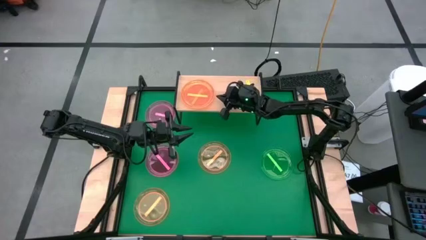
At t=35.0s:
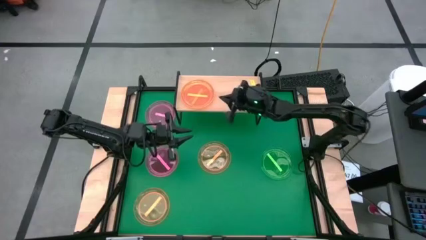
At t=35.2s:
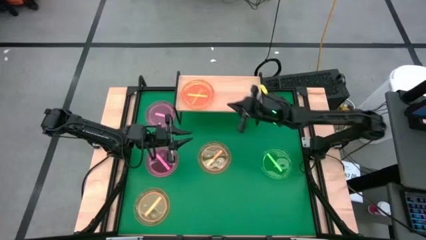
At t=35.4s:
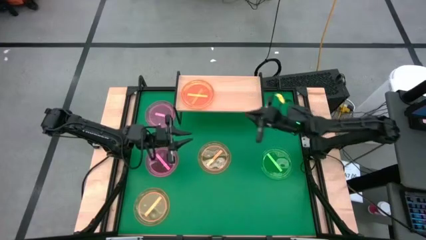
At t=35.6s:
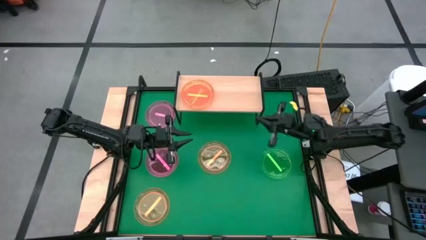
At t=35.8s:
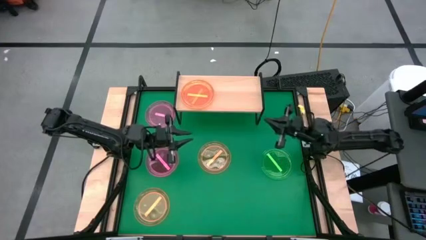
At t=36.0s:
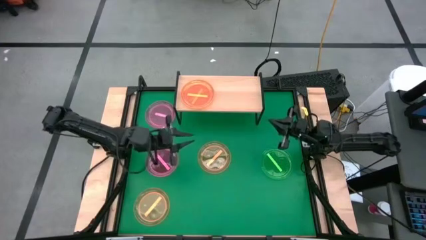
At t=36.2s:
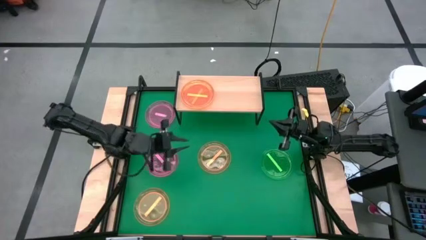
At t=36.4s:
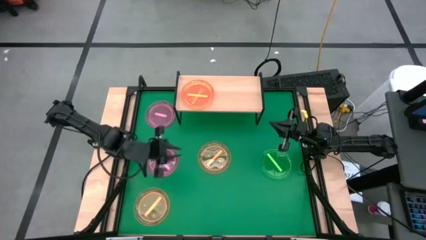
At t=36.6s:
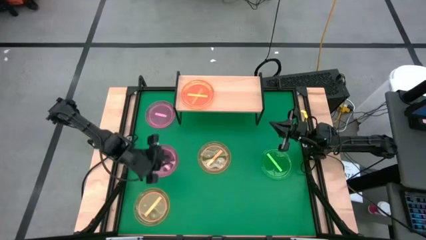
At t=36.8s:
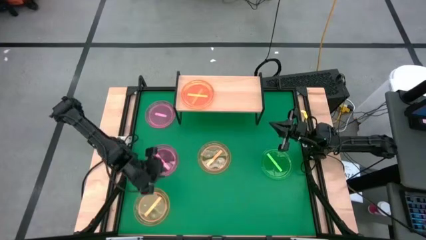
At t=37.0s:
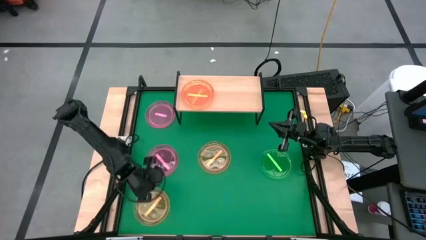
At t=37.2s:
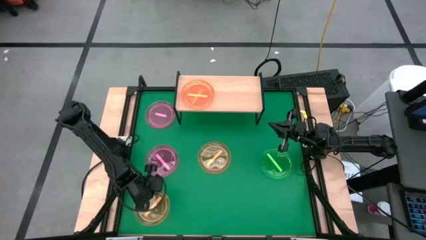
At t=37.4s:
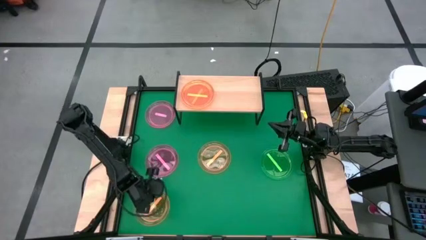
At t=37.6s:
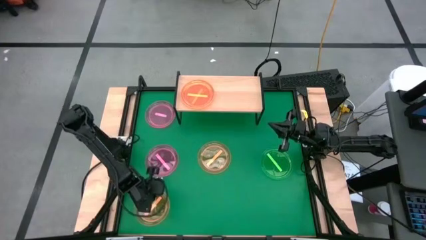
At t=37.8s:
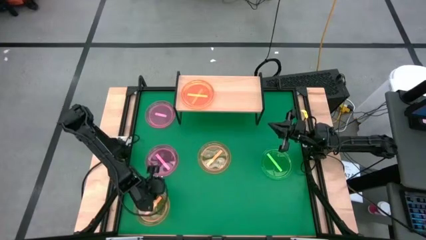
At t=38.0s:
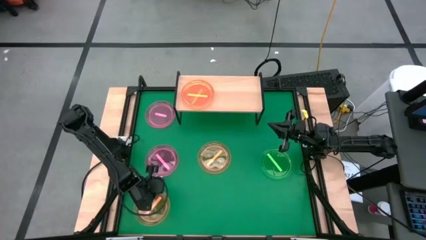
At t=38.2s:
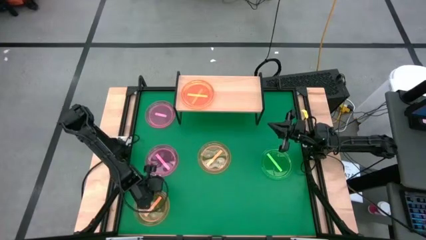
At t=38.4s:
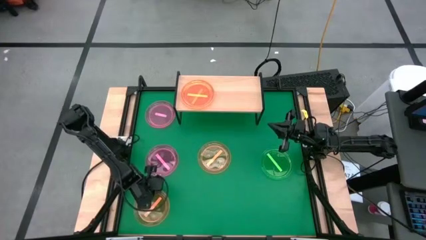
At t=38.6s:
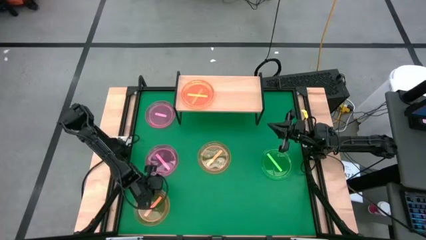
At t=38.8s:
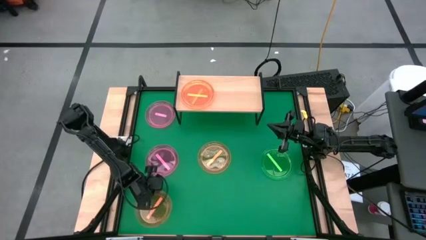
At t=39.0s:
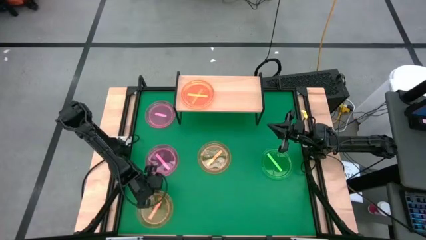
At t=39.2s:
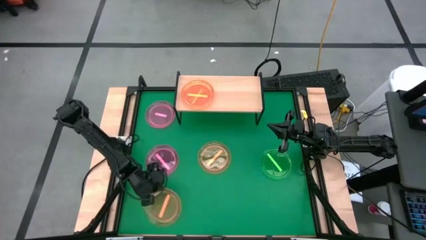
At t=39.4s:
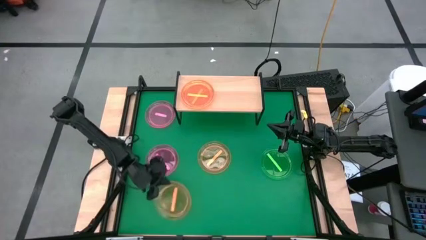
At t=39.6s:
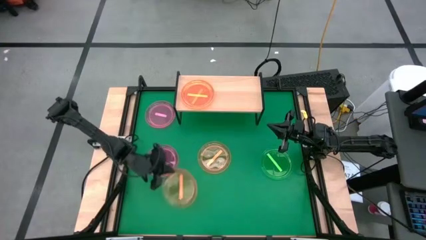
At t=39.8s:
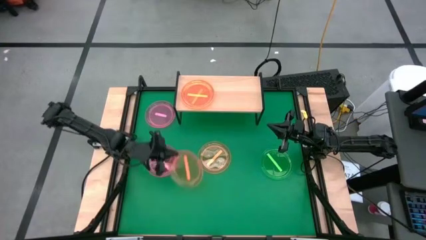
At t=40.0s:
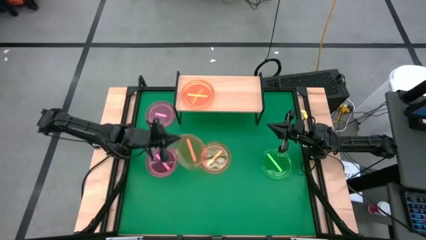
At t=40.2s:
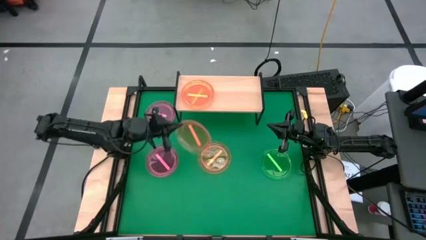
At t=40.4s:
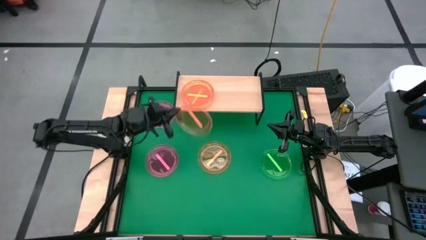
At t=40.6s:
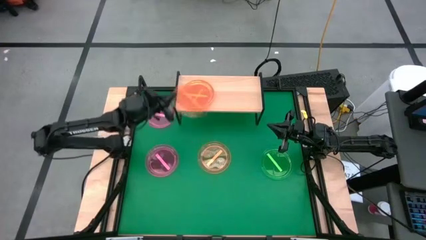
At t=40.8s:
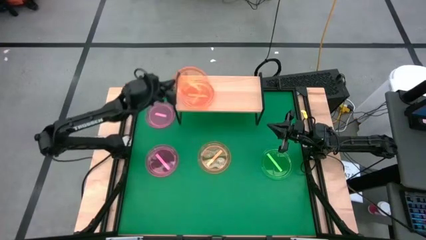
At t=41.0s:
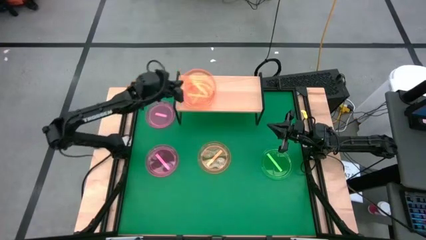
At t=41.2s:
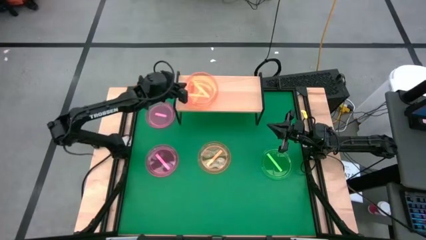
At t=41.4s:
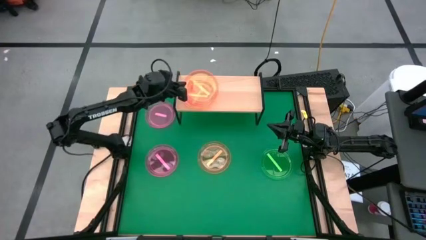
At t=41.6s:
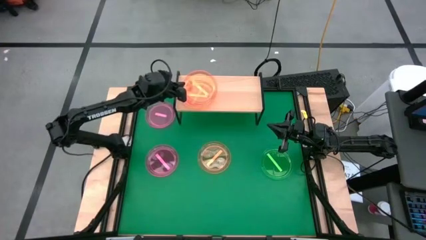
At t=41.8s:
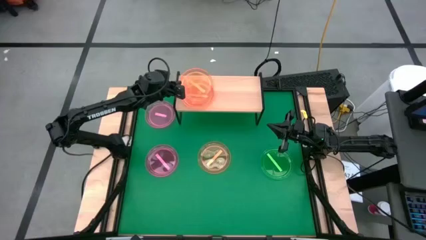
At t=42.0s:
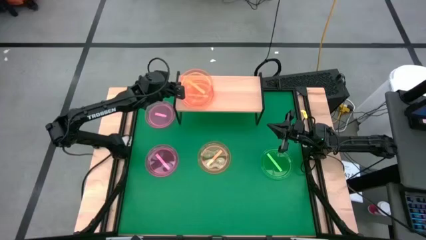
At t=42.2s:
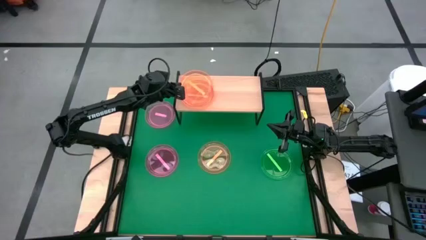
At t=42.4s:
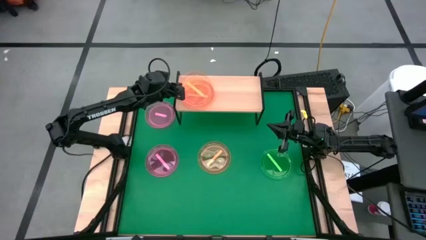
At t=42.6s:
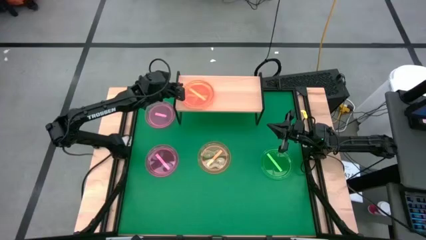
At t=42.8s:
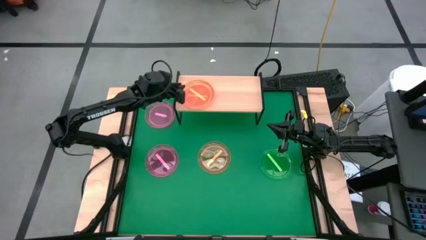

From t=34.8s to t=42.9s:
Task: Place and stack plates onto a shelf
Stack the bottom orange plate on the orange plate on the shelf

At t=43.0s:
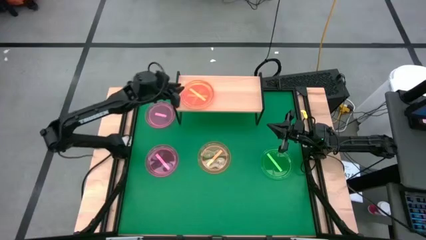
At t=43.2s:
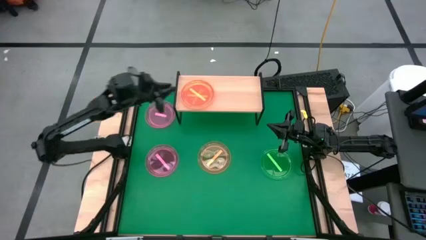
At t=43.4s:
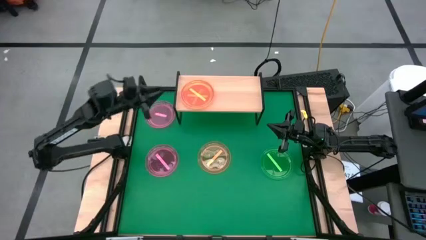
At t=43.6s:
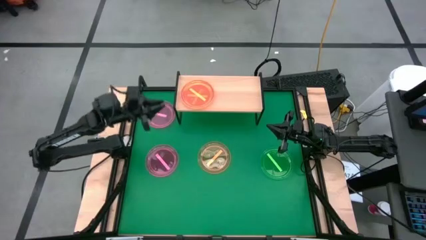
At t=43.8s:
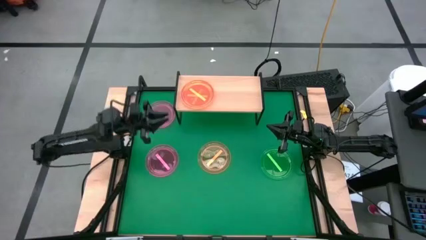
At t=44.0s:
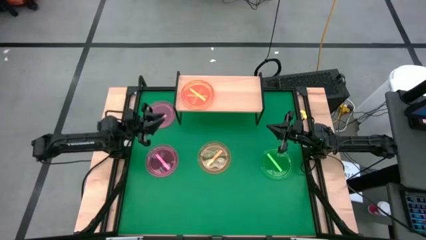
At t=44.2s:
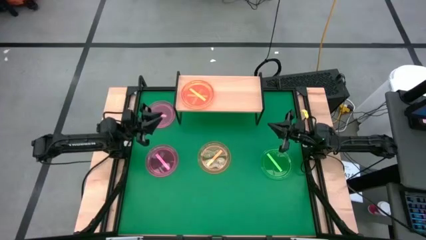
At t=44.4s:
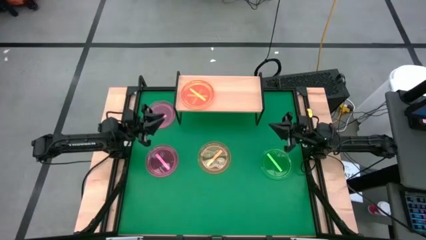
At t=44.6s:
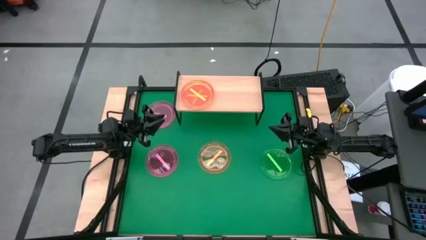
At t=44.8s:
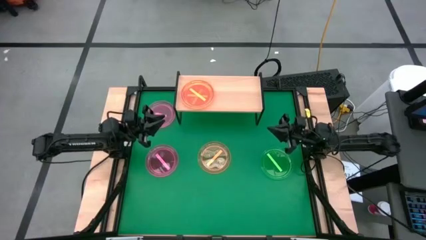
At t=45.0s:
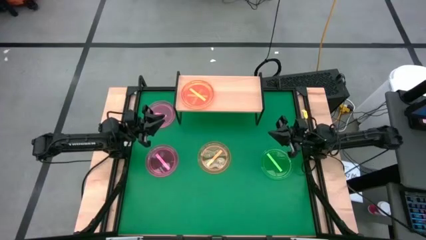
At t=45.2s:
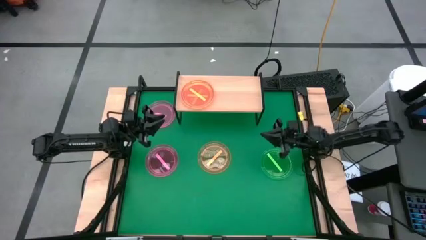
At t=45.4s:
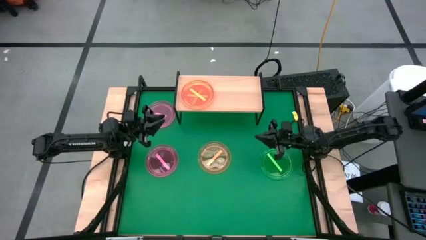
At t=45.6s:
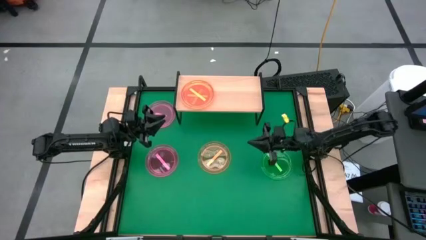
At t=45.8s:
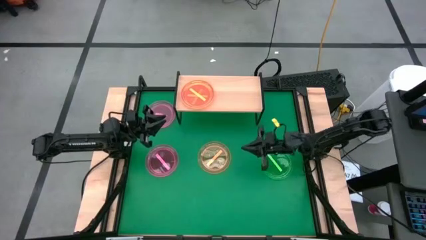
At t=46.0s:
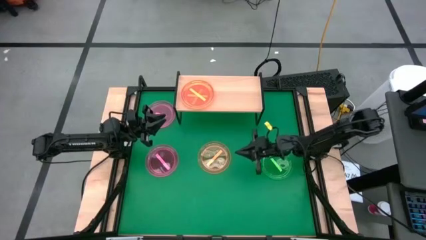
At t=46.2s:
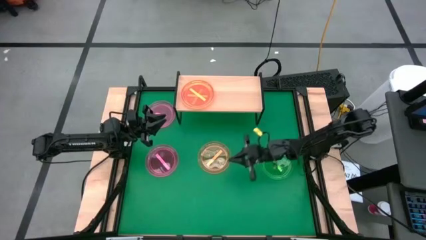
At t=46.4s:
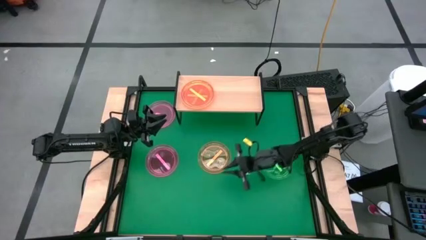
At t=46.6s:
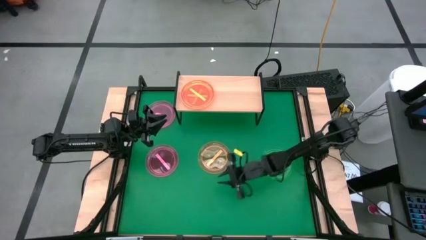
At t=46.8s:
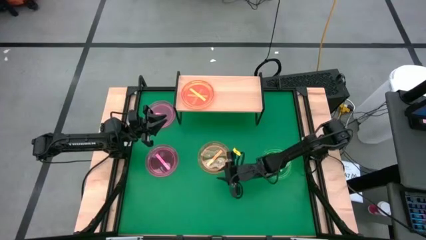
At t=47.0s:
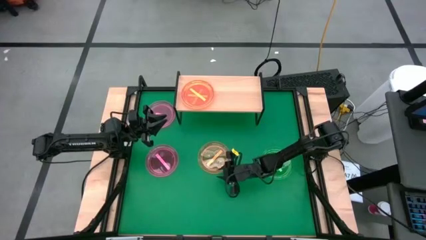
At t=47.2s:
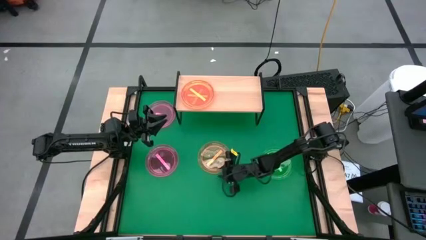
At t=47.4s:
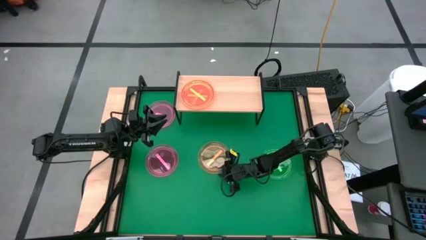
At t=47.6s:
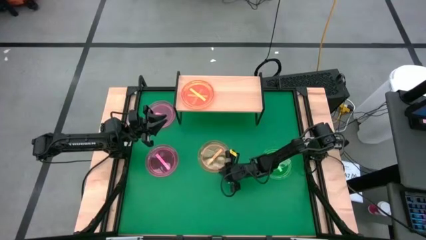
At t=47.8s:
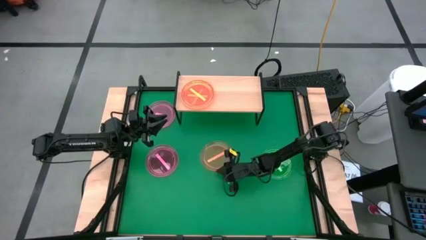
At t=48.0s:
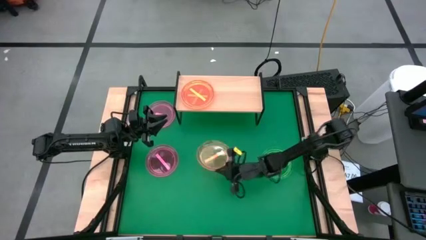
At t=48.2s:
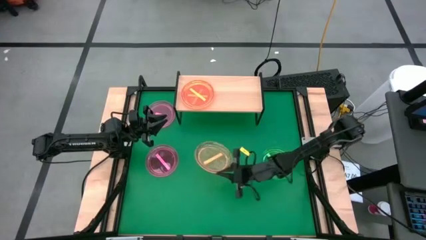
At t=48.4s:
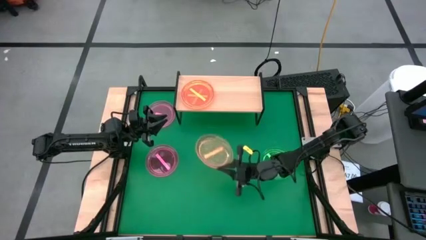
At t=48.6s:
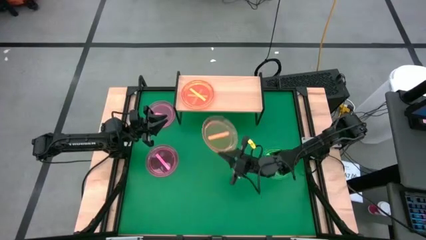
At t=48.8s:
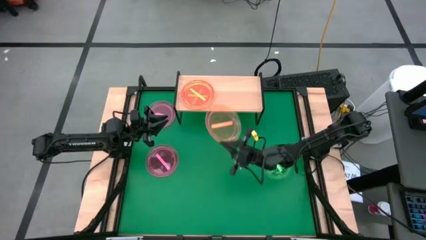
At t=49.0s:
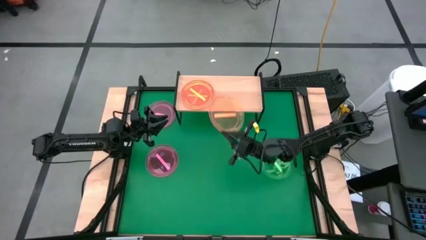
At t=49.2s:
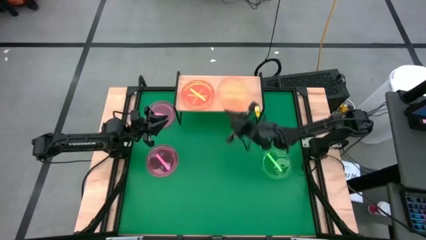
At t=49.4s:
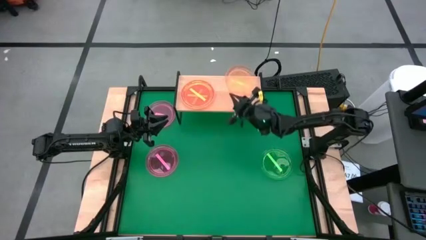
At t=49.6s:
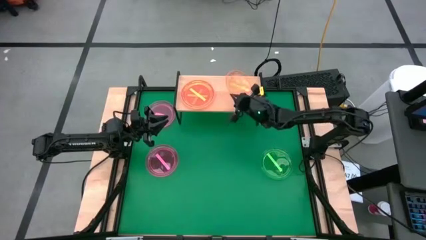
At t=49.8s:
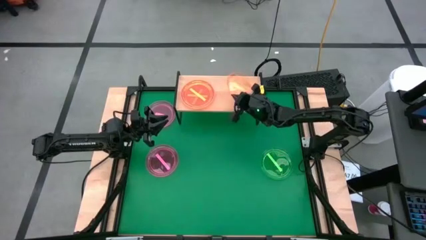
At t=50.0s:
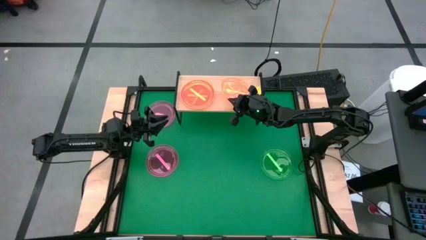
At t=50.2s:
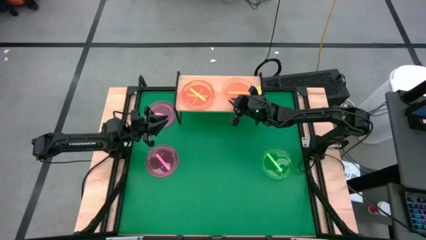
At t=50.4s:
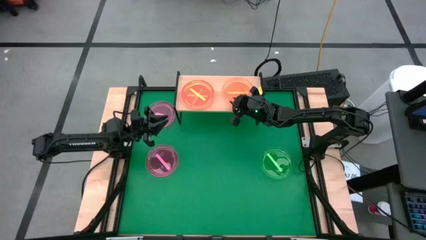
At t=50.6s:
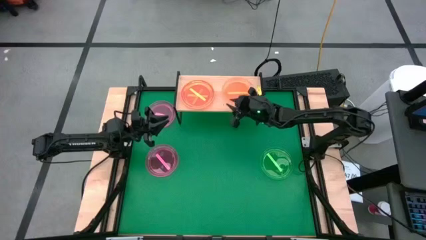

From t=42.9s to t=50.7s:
Put the orange plate on the shelf
